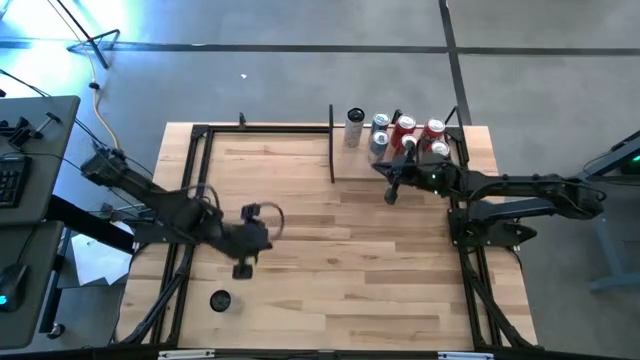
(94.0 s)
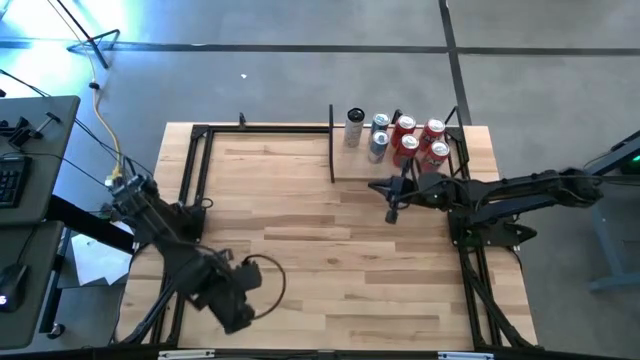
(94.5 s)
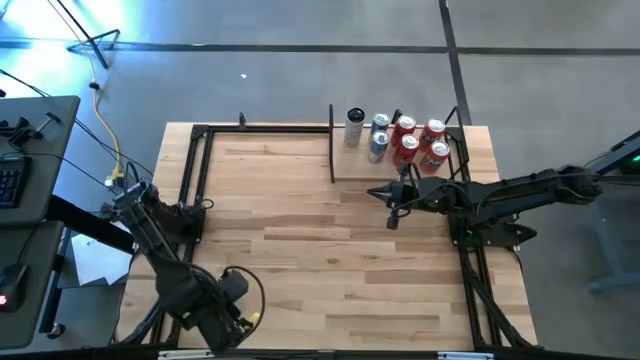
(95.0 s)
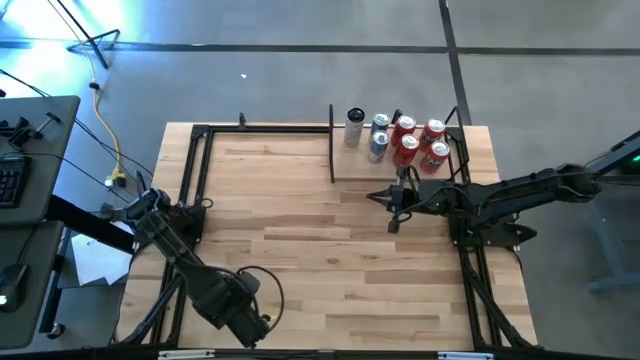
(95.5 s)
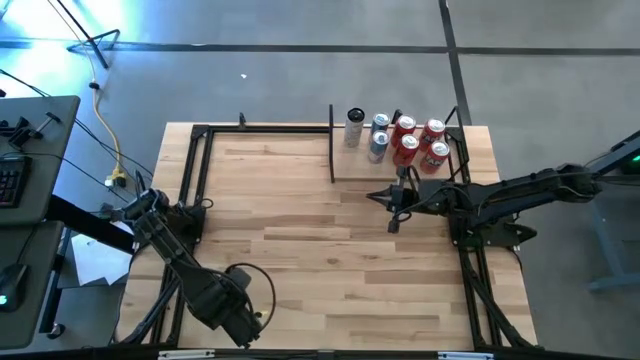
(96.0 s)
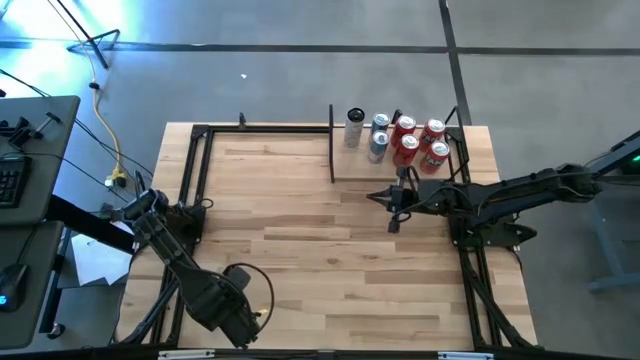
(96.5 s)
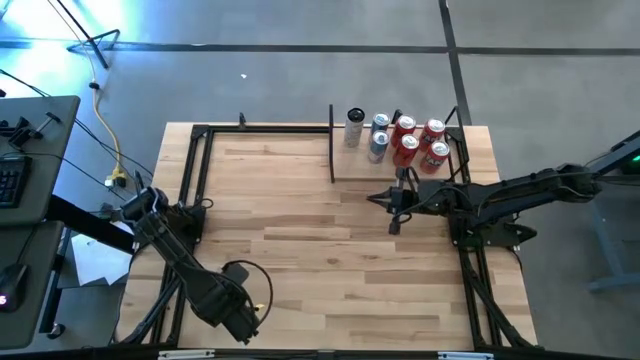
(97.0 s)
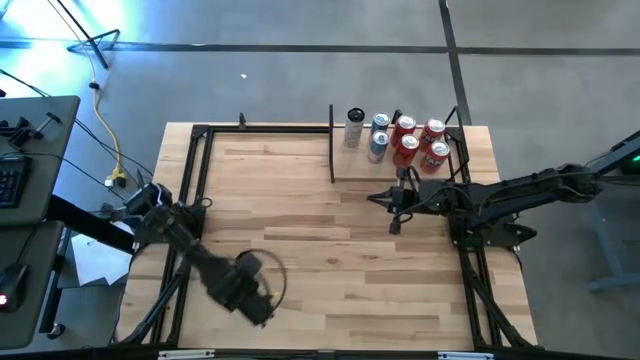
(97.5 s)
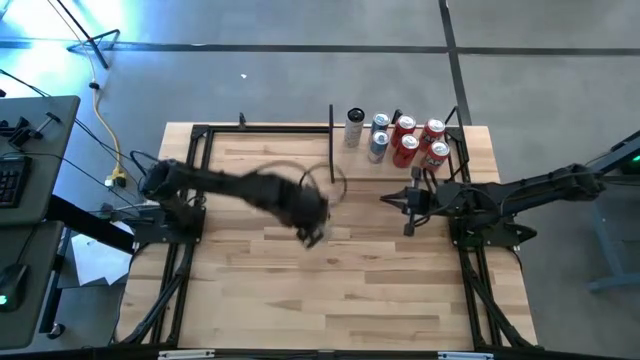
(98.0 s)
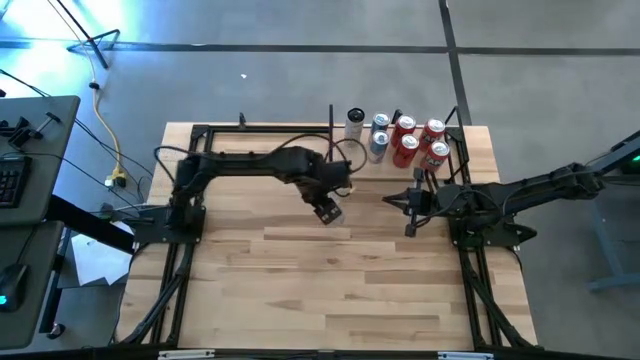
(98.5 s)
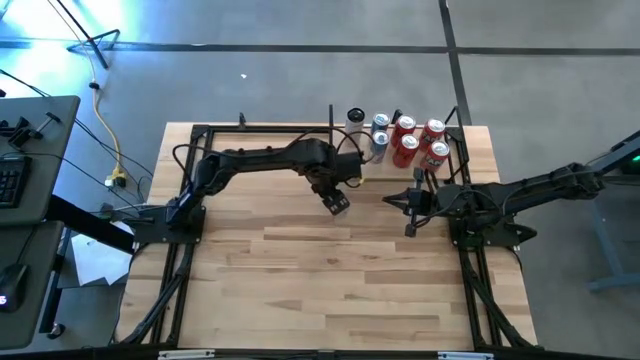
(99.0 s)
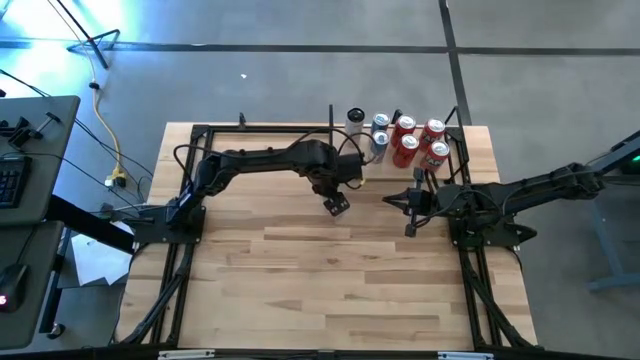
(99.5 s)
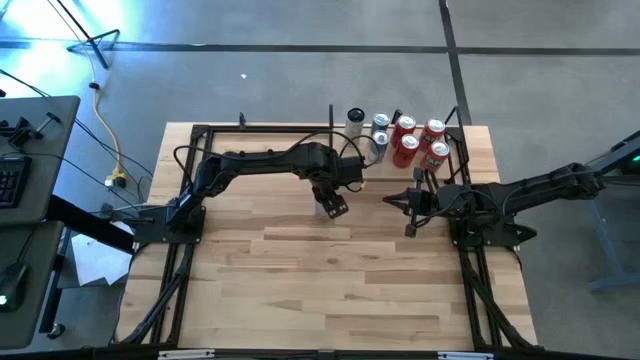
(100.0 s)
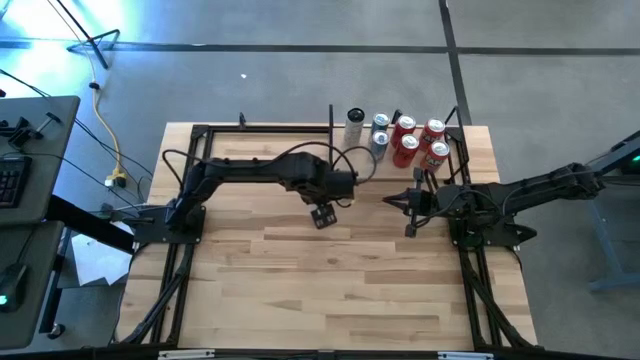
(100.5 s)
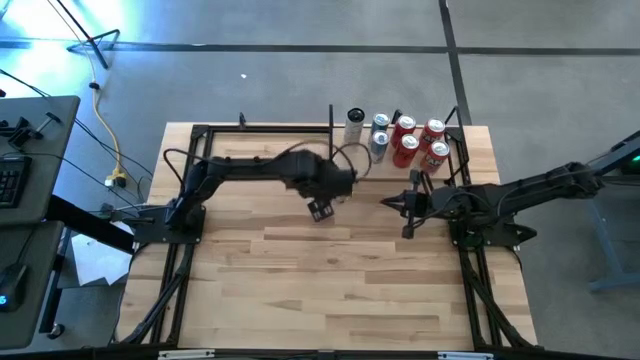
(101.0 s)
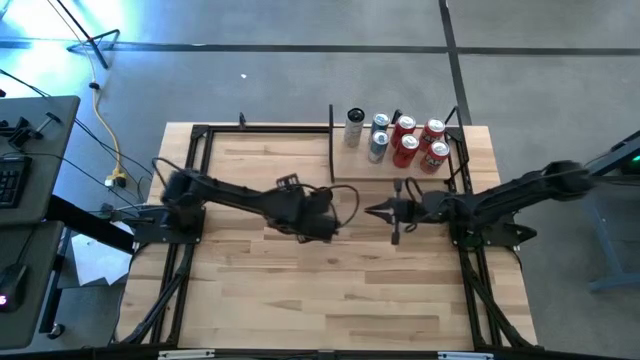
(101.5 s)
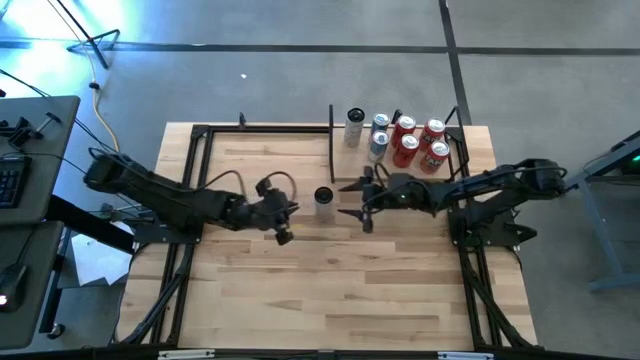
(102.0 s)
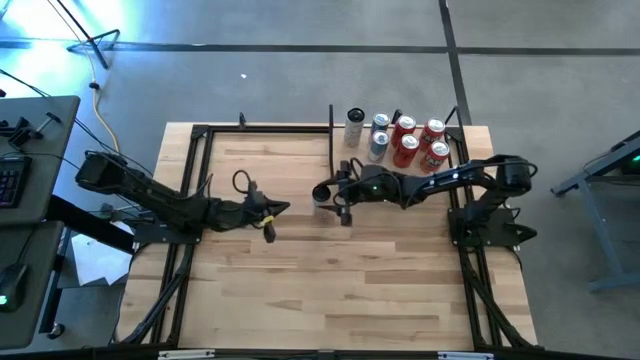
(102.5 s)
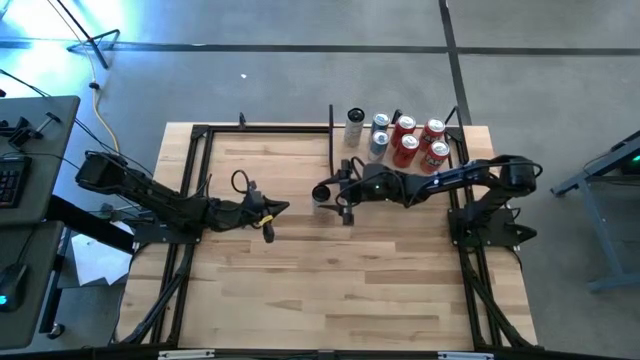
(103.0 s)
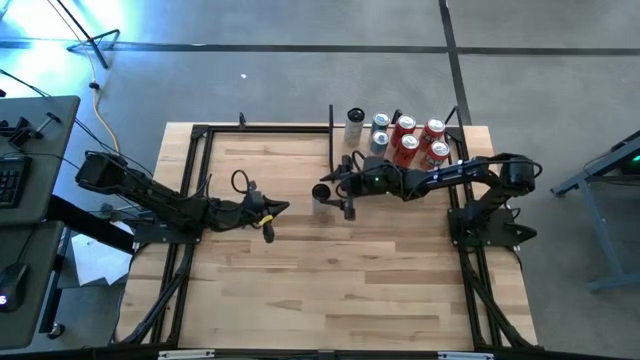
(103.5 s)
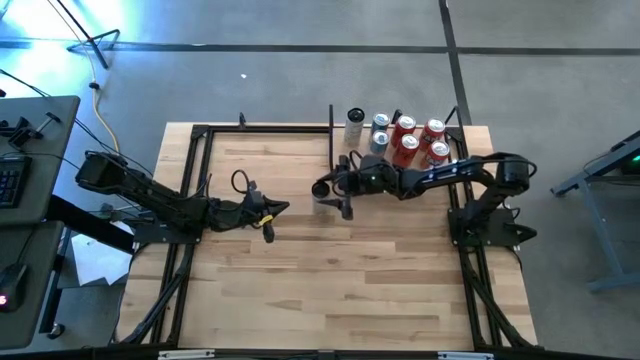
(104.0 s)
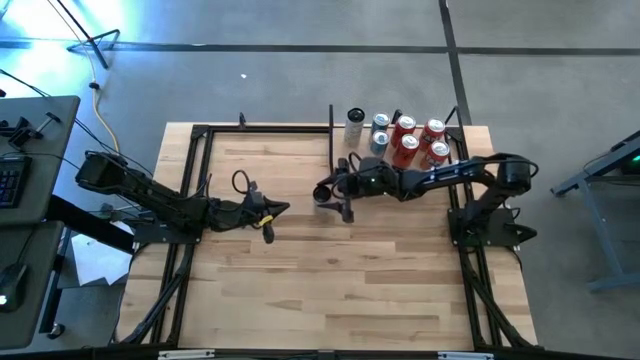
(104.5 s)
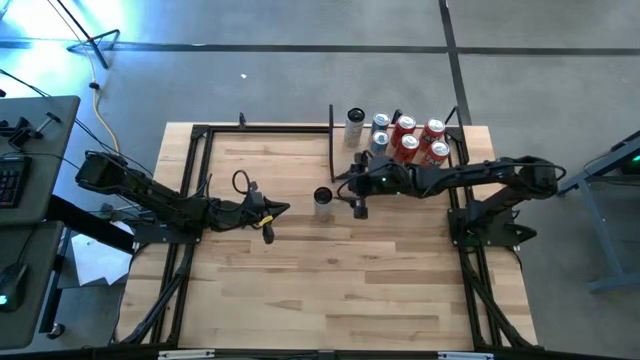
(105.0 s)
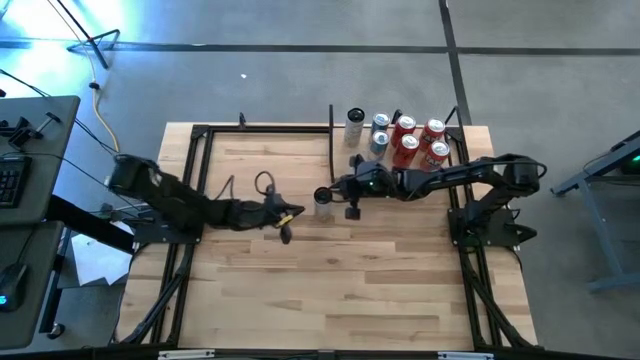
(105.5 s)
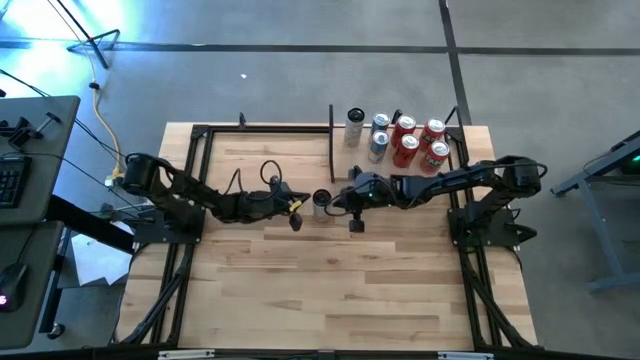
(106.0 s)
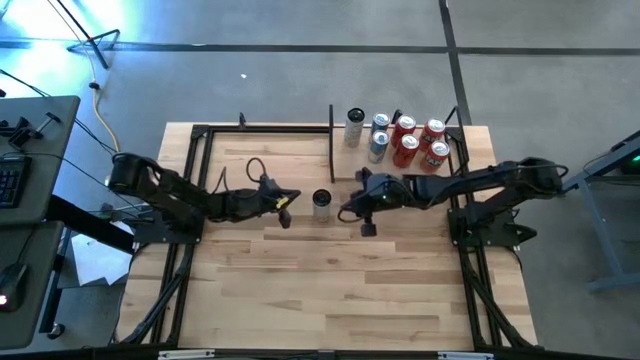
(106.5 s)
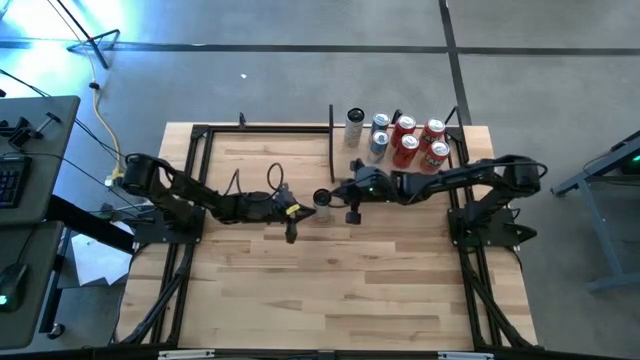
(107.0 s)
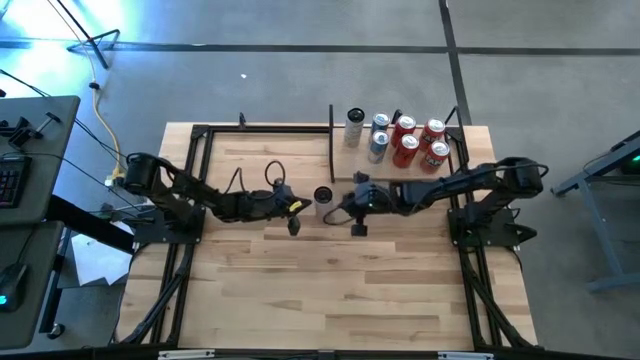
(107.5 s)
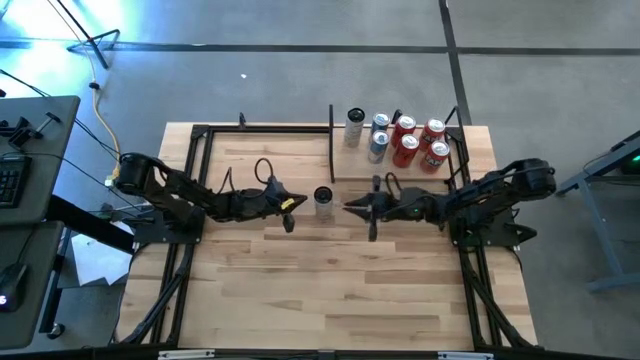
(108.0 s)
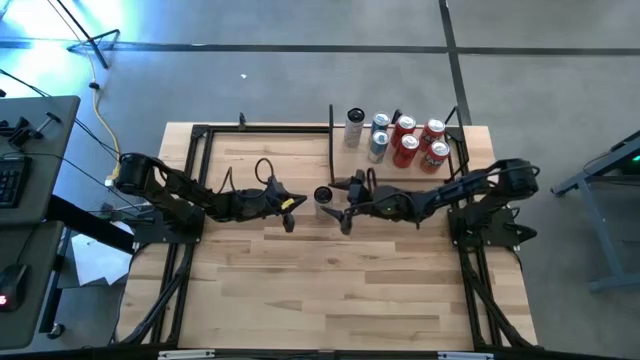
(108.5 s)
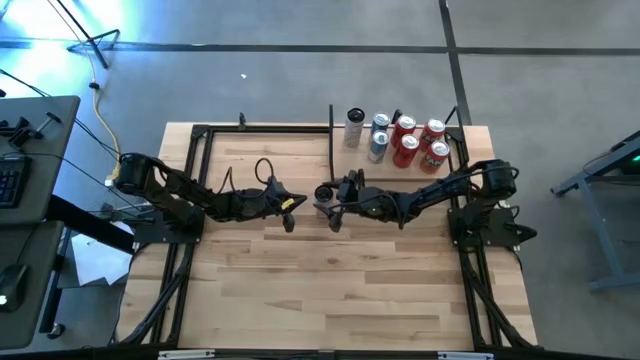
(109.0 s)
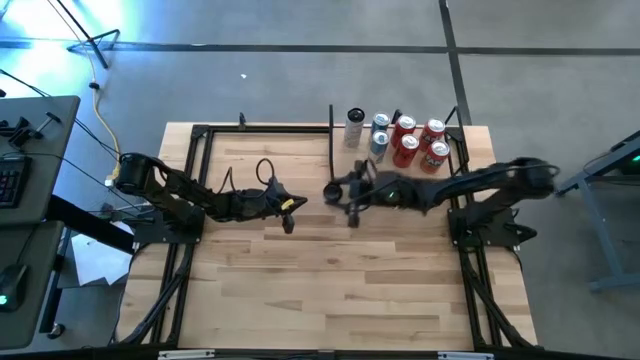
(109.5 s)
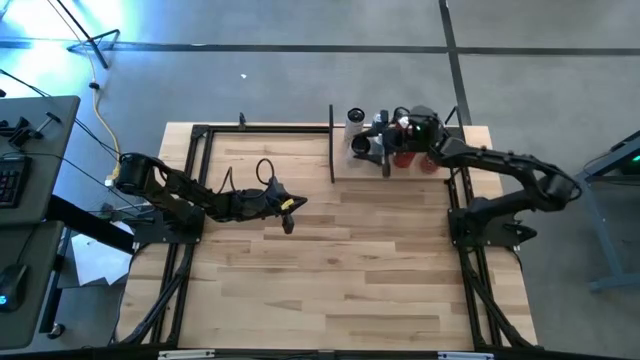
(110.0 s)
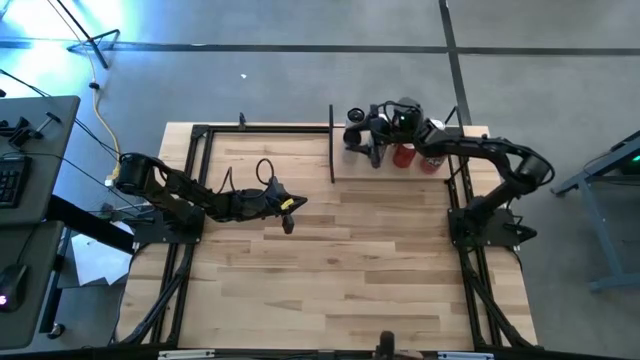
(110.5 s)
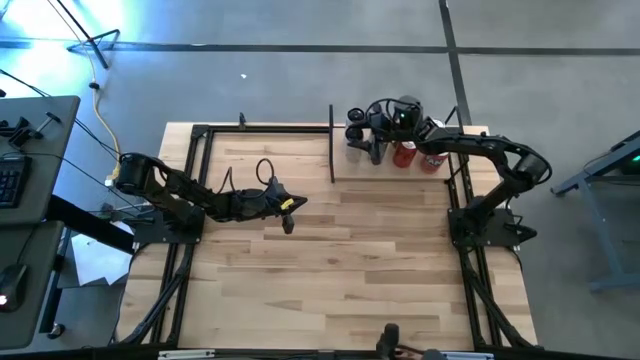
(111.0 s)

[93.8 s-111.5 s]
Task: Place canned beverage on shelf
Put the white soda can on the shelf and align it with the other white soda can

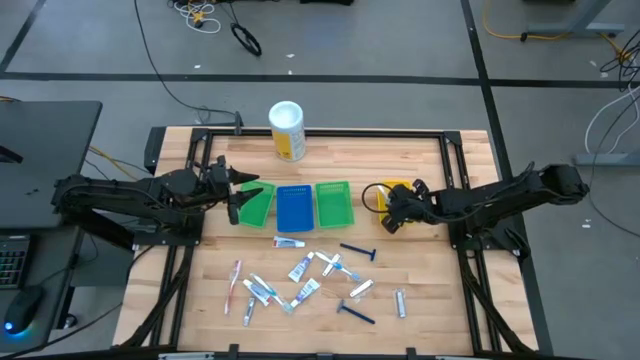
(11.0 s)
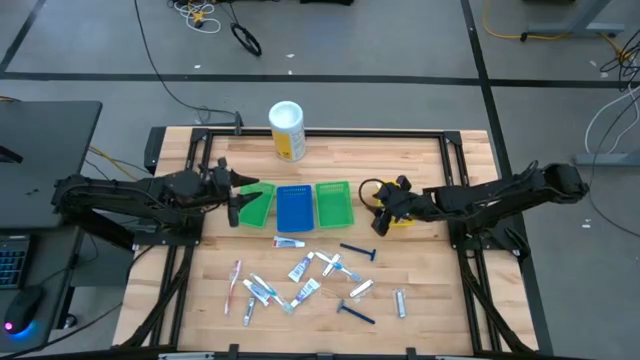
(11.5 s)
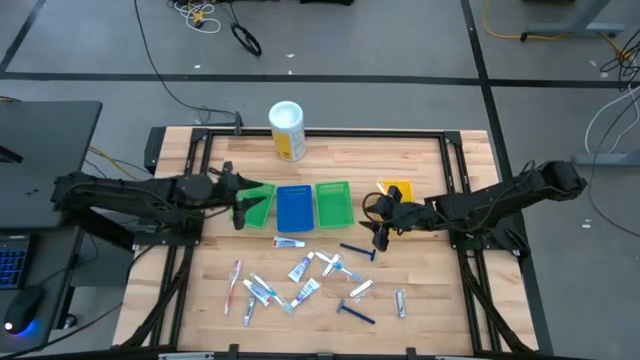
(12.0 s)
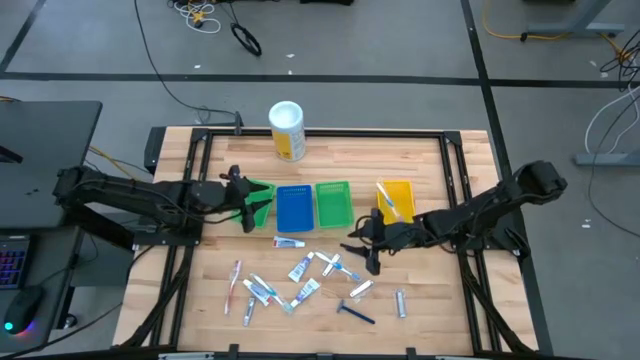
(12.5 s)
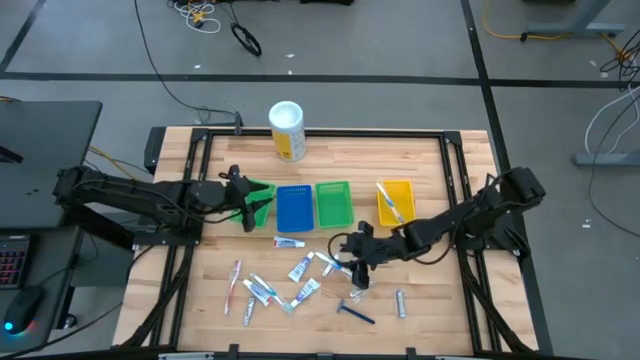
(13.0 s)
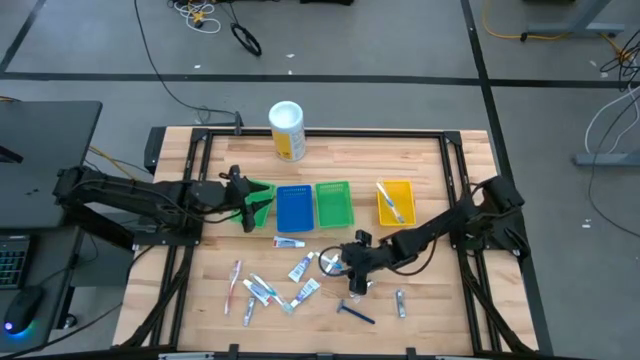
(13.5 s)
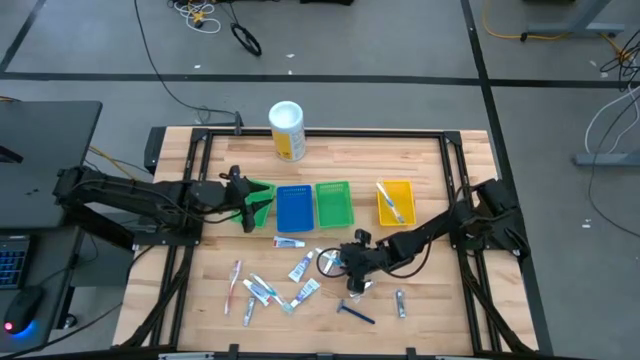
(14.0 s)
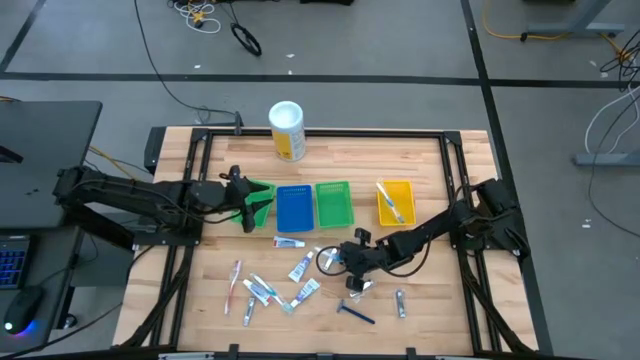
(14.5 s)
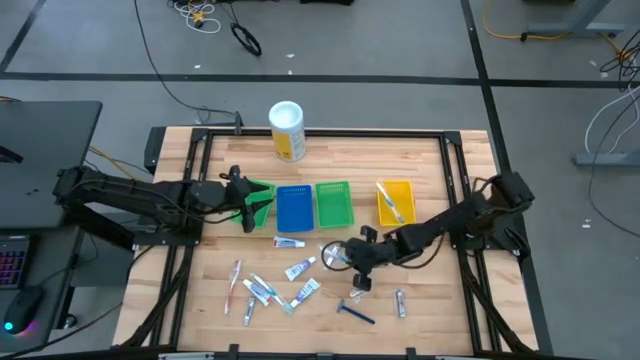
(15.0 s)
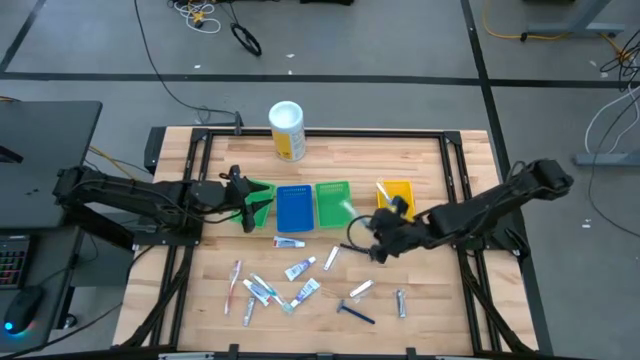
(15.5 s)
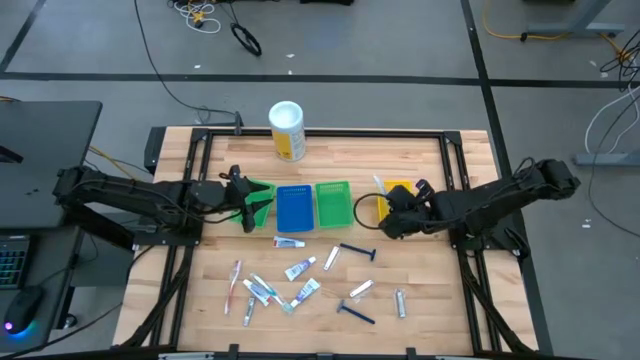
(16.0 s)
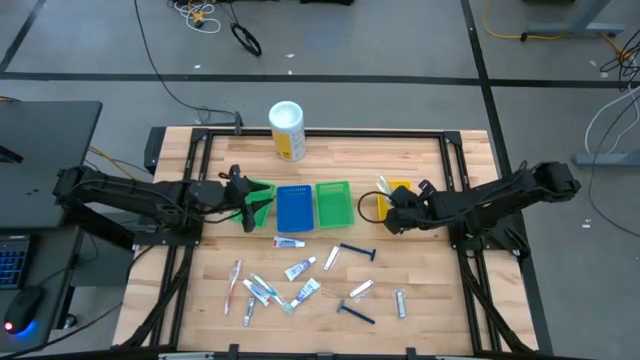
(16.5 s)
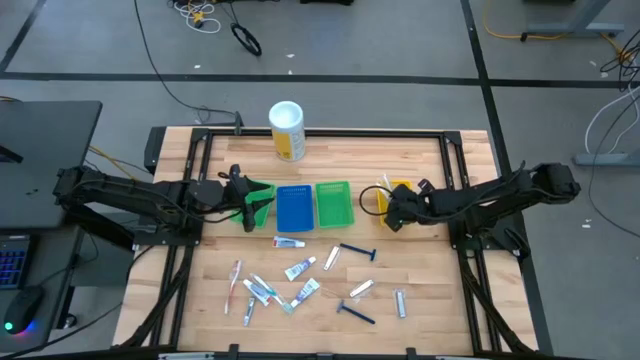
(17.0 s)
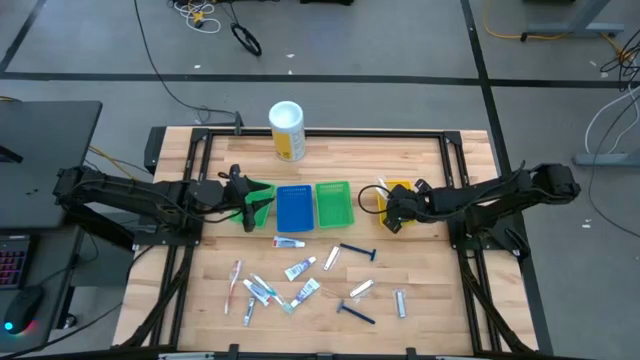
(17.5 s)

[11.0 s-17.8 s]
Task: Pick & Place Travel size toiletries
Put the blue and white toothbrush into the yellow bin
